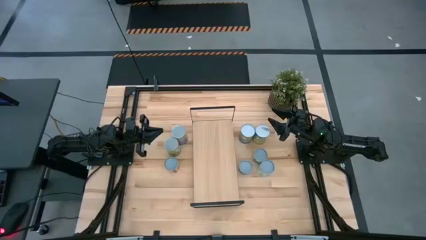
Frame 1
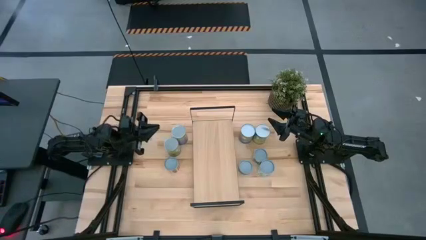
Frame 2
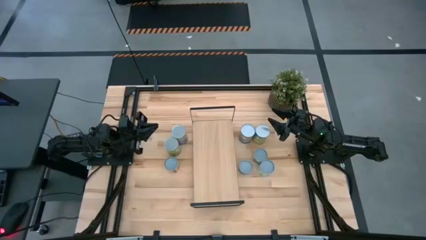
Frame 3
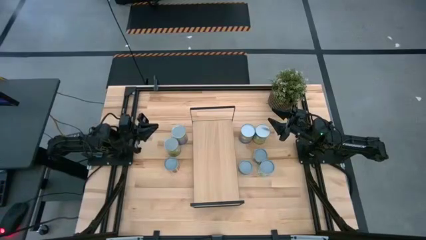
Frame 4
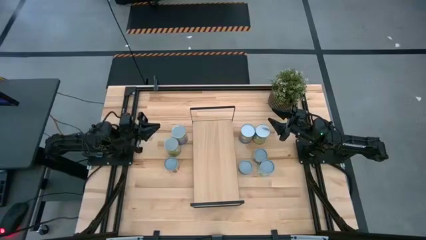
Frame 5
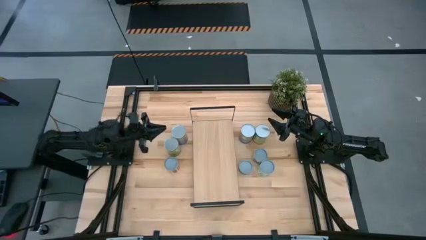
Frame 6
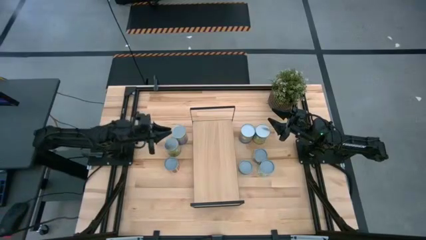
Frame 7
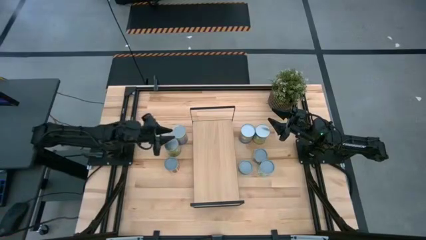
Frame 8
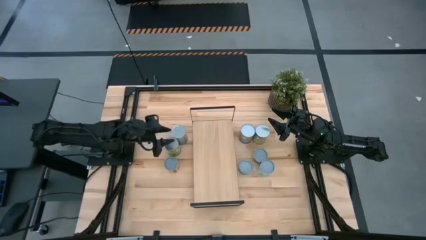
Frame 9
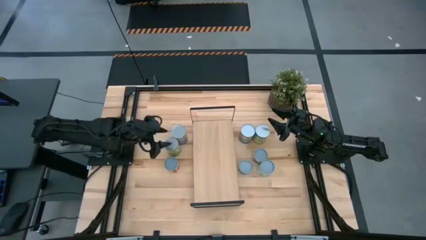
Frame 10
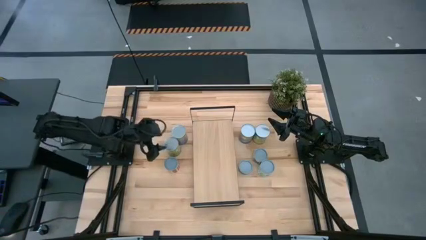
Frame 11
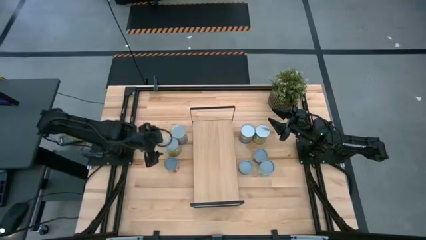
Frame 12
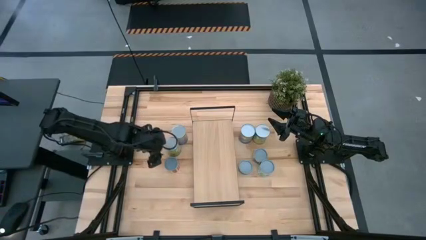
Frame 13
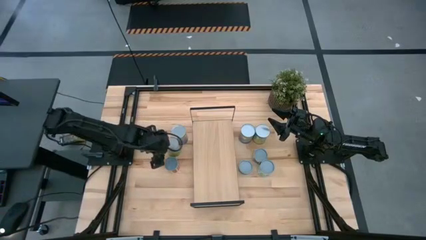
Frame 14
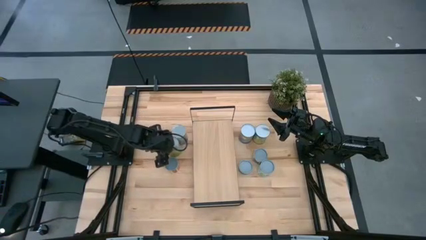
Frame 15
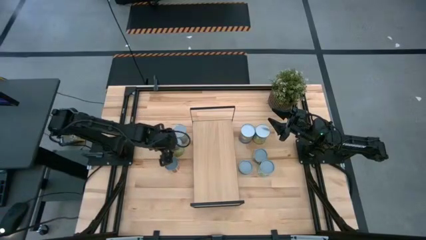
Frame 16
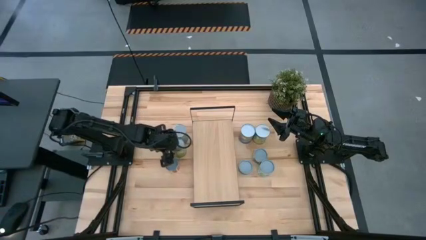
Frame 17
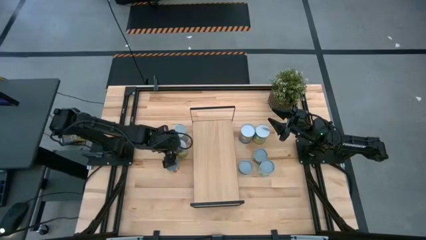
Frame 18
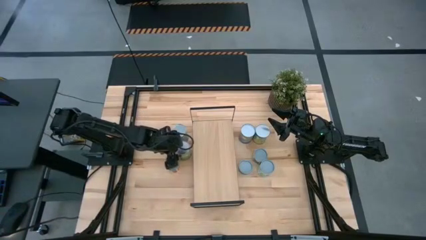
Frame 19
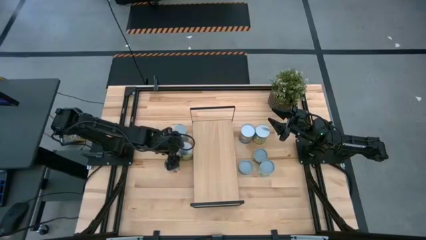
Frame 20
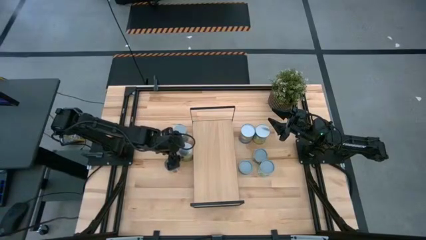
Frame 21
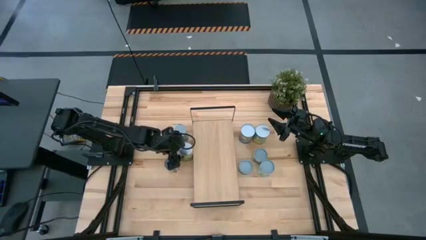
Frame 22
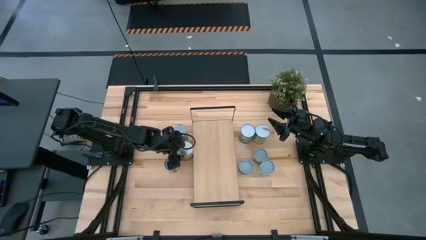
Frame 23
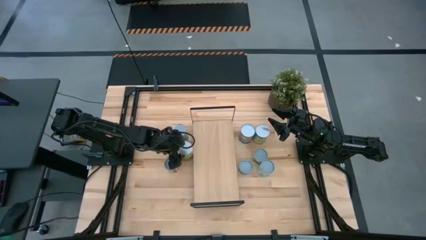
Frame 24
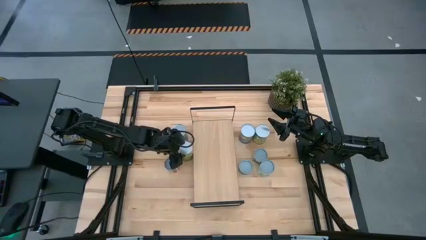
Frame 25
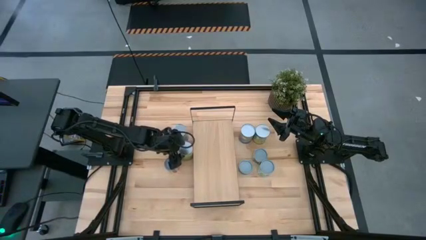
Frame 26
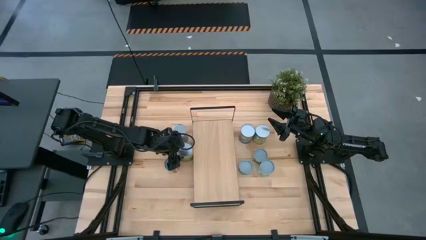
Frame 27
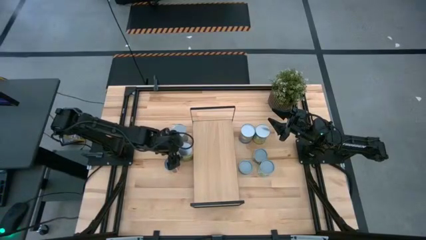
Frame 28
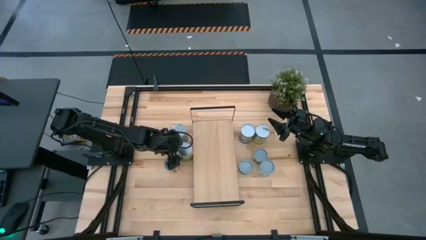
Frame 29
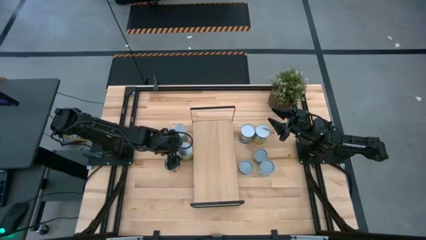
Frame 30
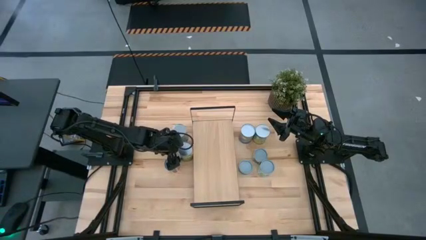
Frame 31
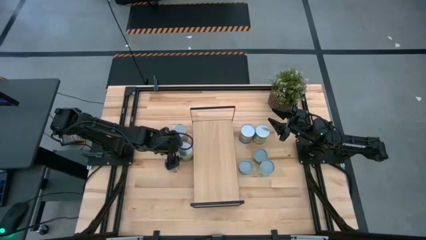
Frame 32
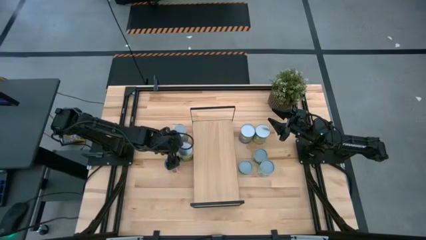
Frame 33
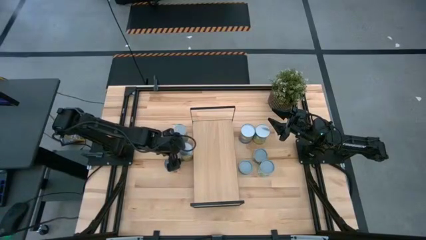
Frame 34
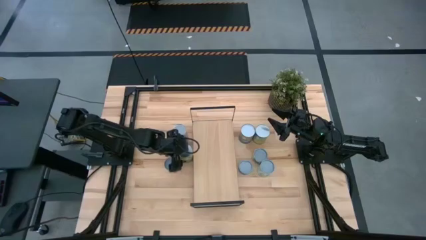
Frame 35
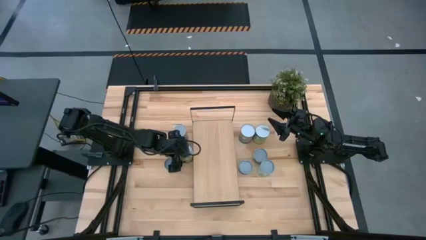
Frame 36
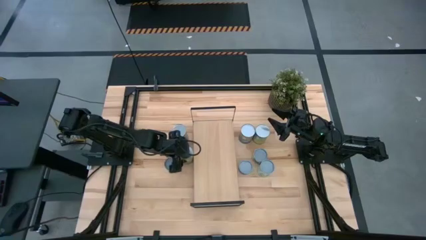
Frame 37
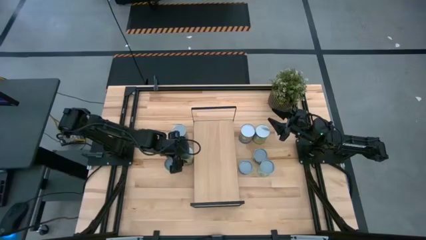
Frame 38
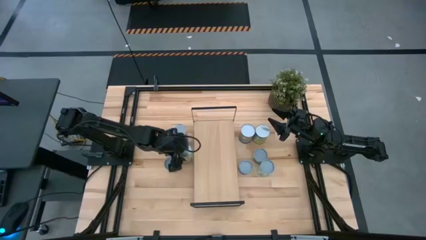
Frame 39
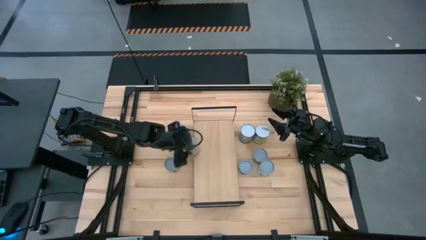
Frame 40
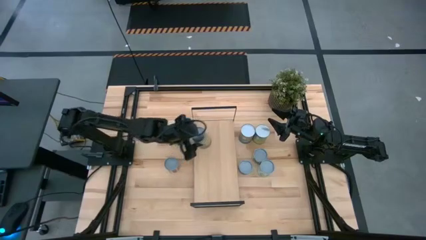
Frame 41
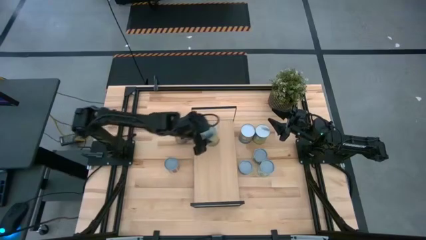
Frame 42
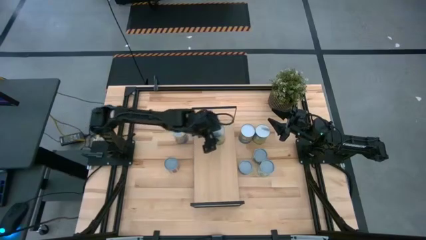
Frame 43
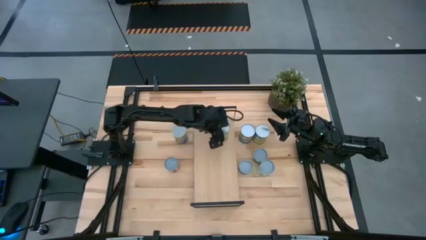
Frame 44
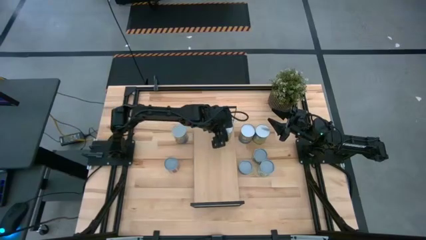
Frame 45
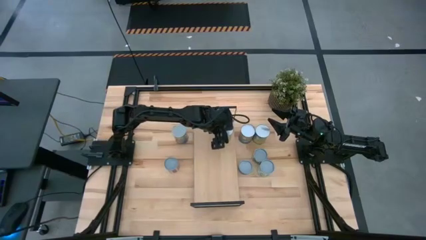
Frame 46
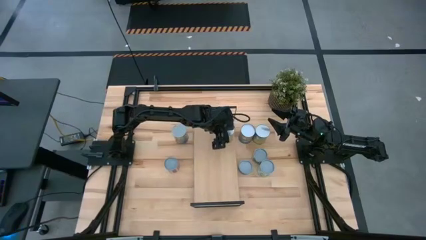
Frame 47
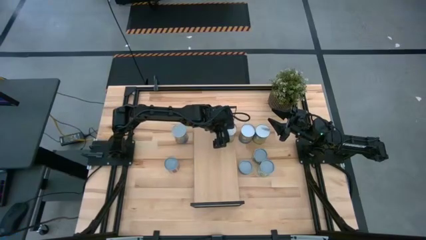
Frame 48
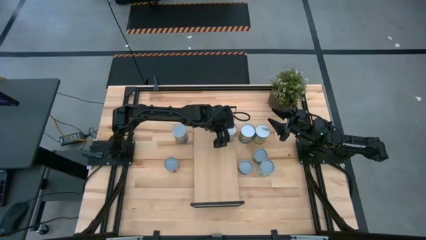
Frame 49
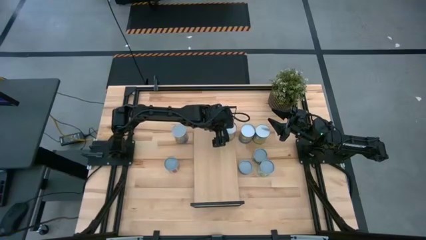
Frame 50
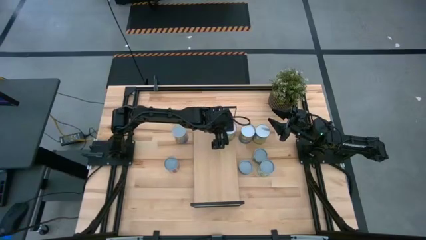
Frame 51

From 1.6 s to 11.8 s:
Task: Pick and place cans onto a shelf
Put the canned oranges on the shelf

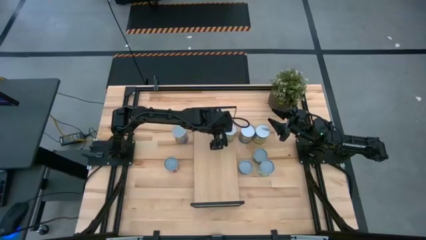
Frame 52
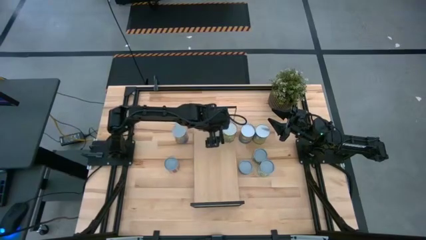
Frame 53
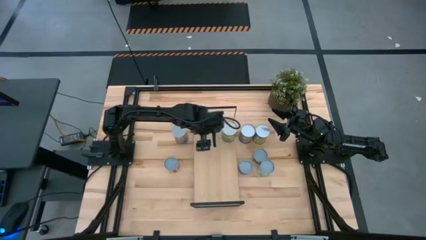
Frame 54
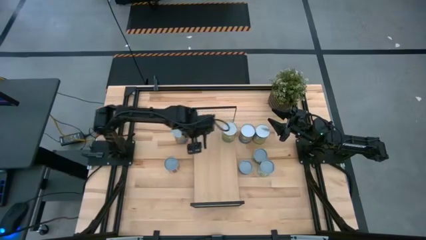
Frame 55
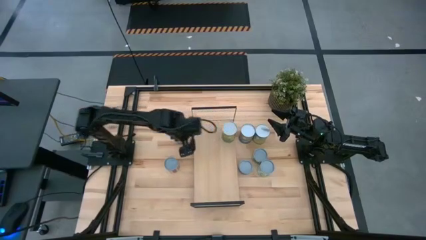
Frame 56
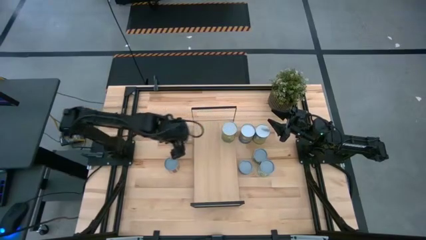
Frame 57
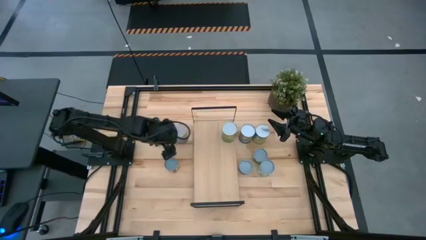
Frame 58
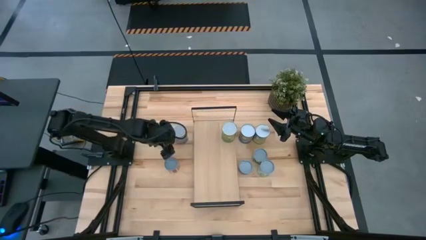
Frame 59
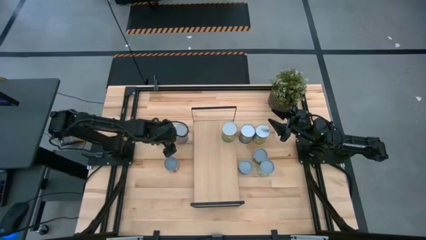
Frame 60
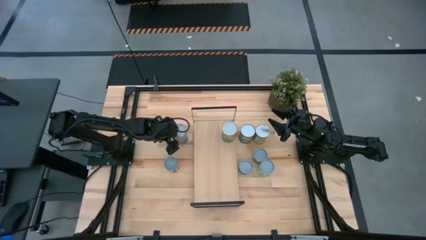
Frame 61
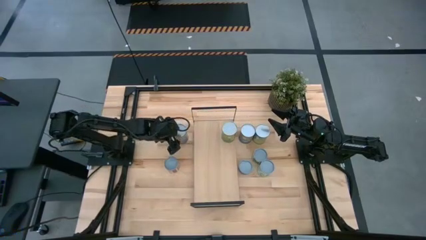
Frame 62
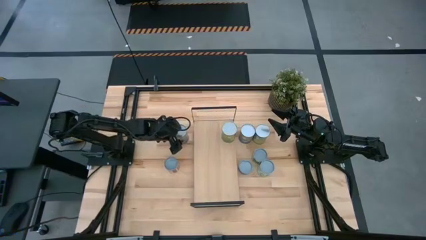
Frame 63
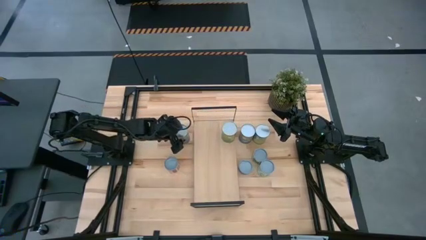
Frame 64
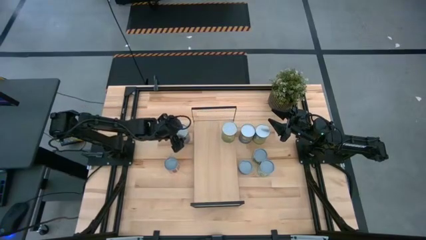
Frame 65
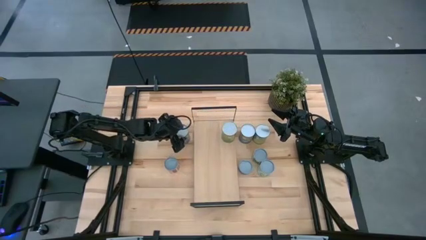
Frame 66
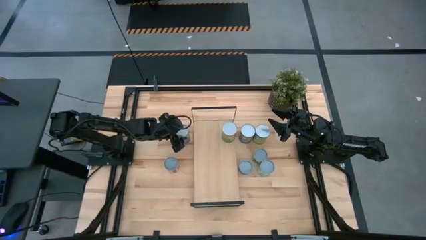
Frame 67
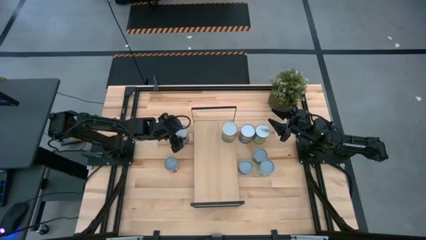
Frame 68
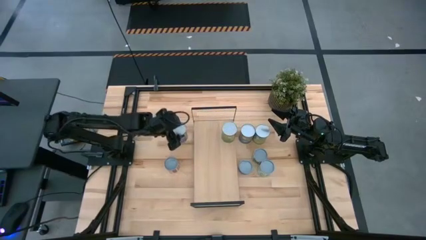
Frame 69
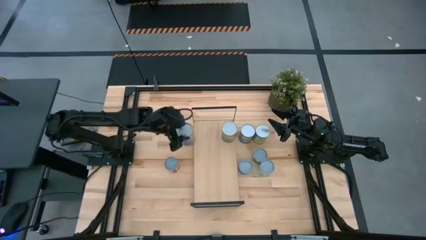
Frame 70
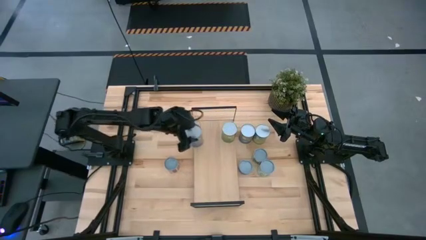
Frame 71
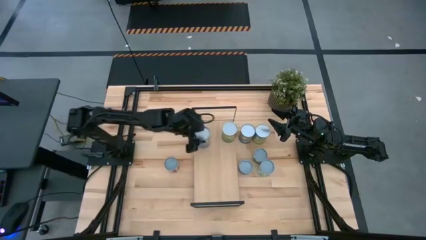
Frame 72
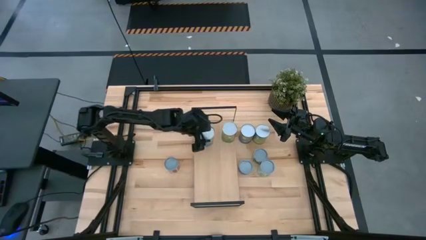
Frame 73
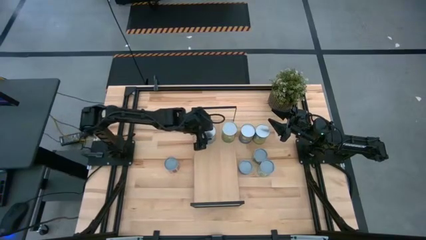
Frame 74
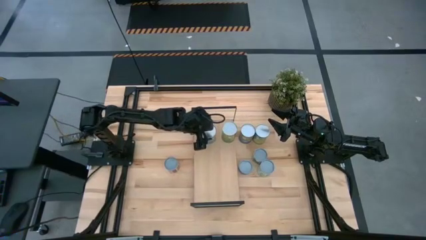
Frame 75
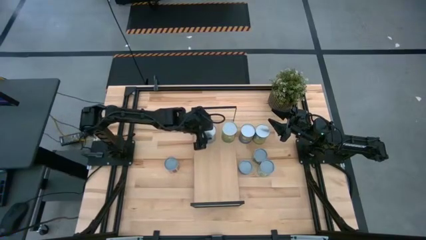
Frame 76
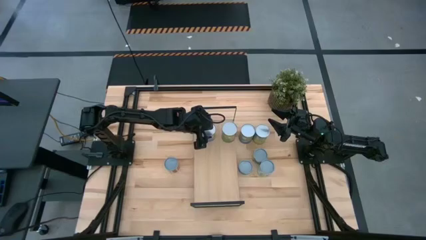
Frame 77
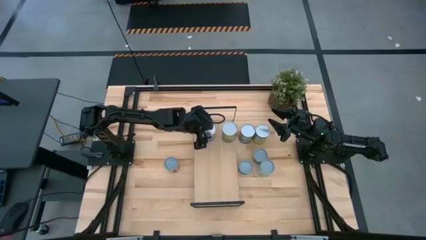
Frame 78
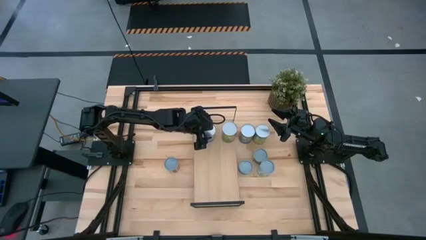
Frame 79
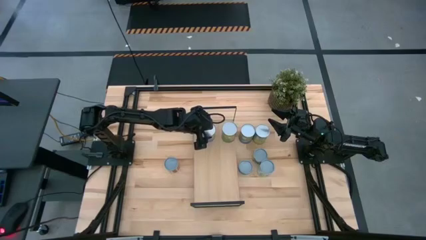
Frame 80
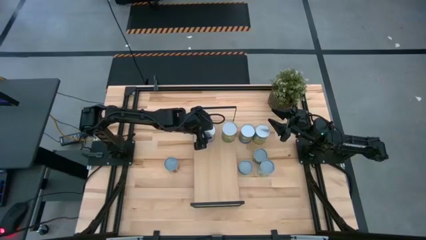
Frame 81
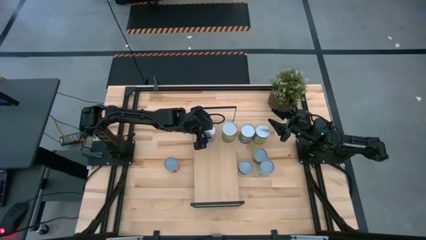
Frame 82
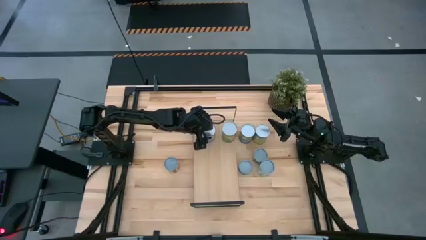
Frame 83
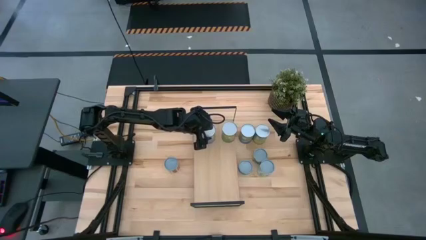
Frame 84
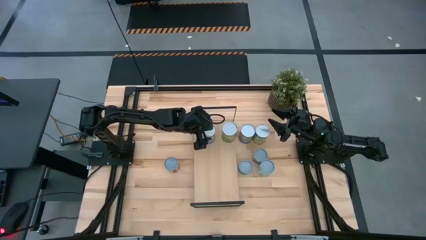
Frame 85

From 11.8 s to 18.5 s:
Put the canned peaches on the shelf
